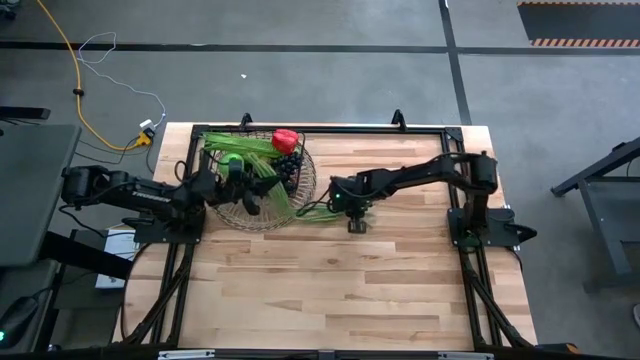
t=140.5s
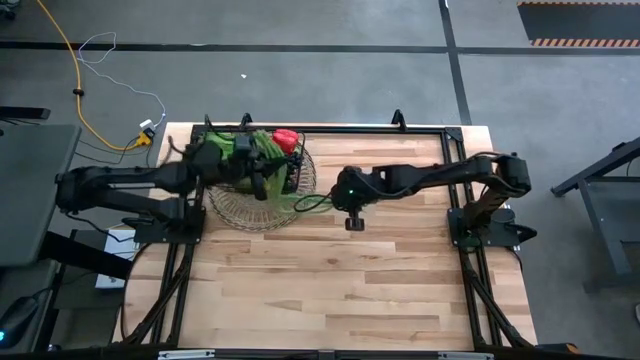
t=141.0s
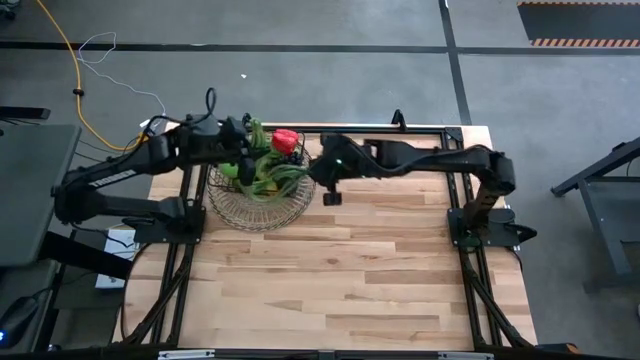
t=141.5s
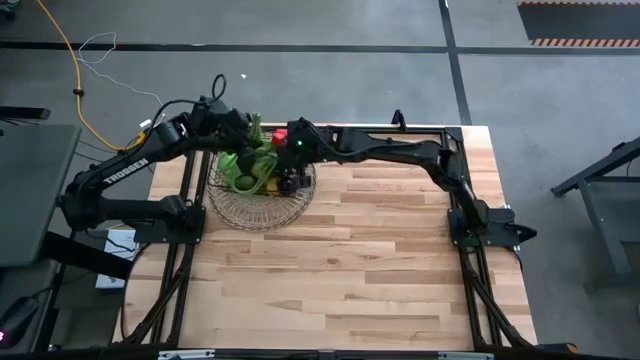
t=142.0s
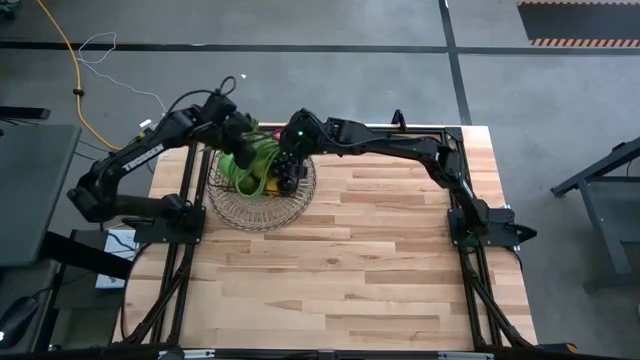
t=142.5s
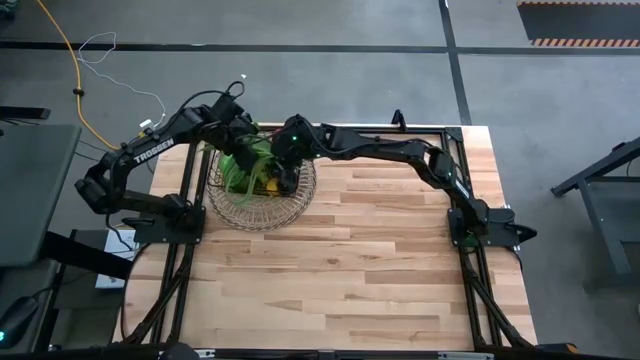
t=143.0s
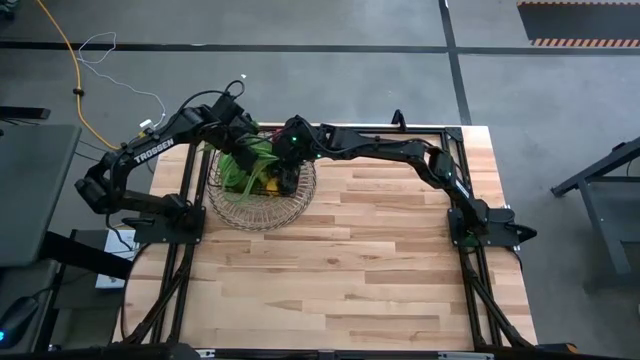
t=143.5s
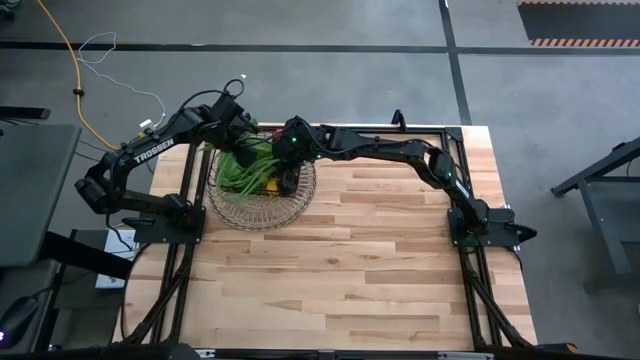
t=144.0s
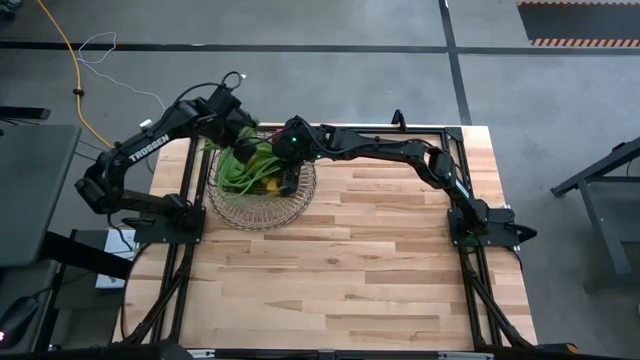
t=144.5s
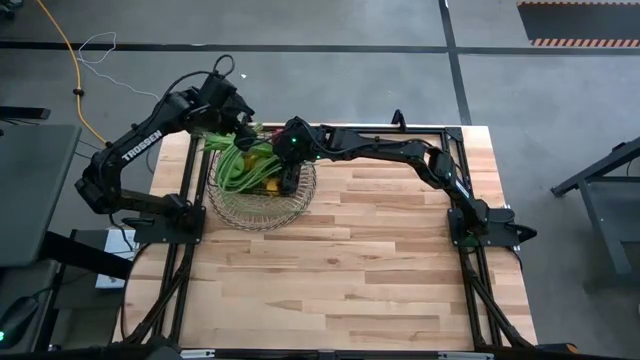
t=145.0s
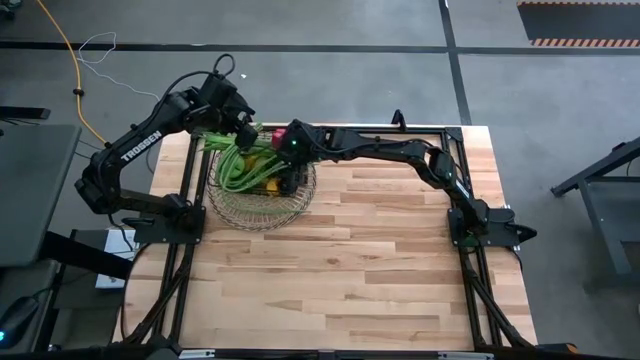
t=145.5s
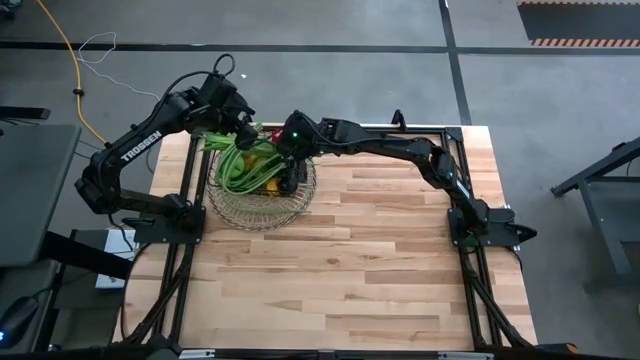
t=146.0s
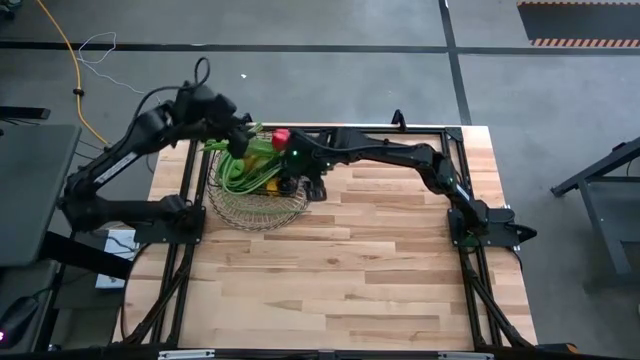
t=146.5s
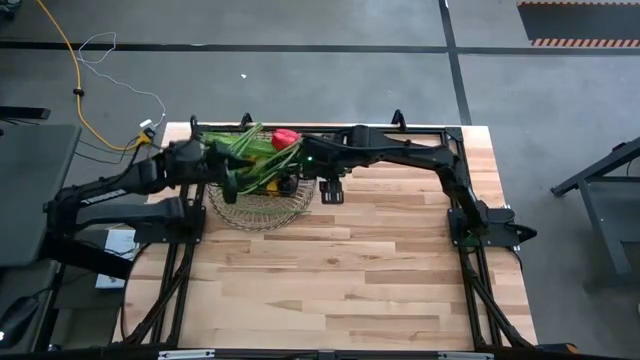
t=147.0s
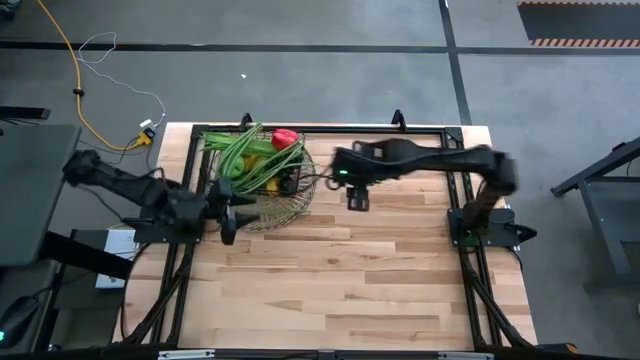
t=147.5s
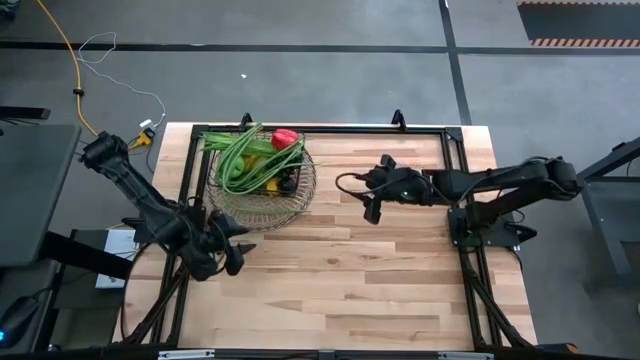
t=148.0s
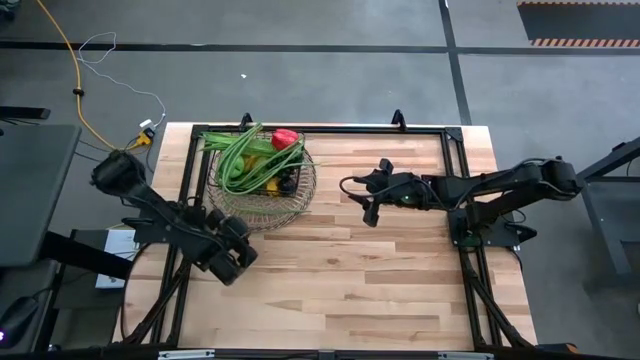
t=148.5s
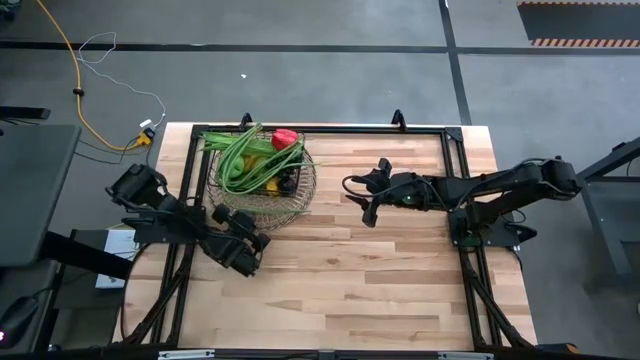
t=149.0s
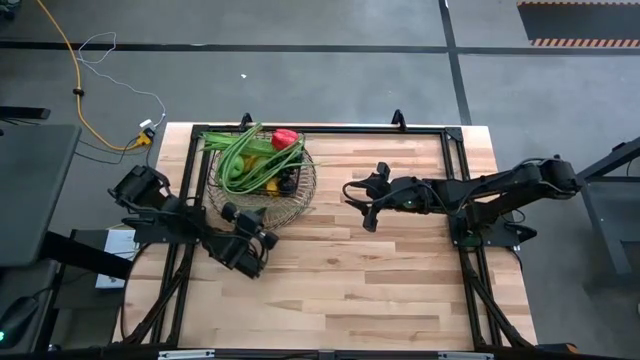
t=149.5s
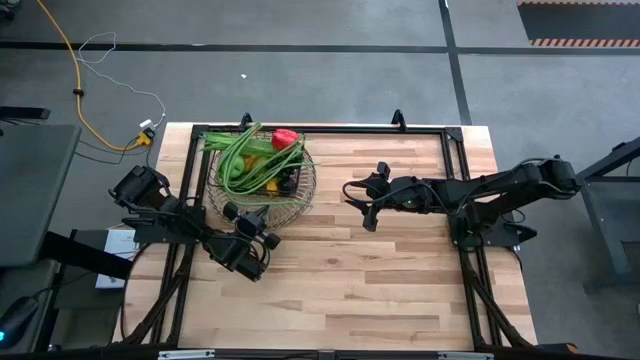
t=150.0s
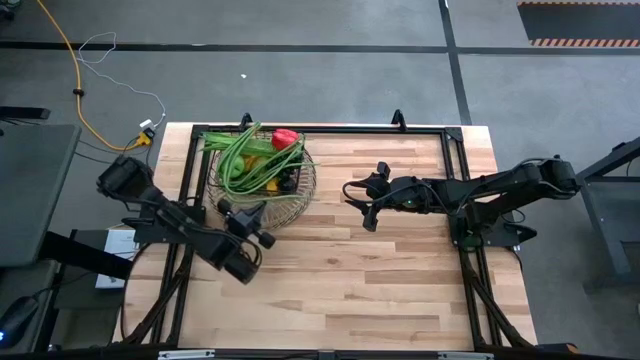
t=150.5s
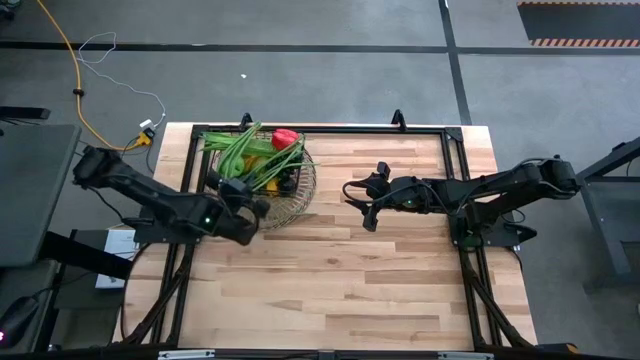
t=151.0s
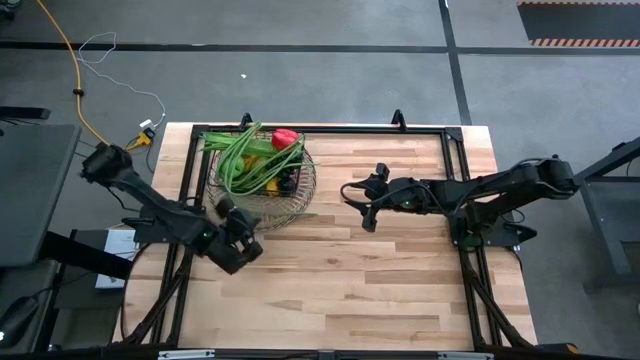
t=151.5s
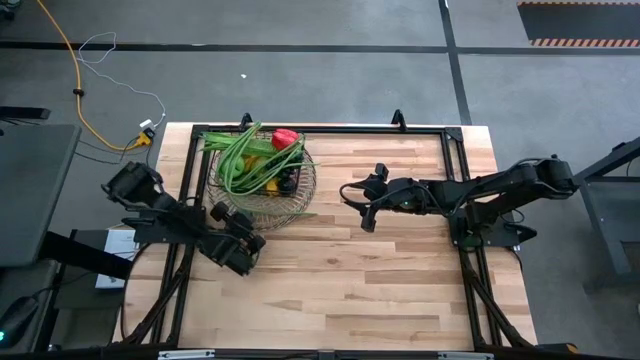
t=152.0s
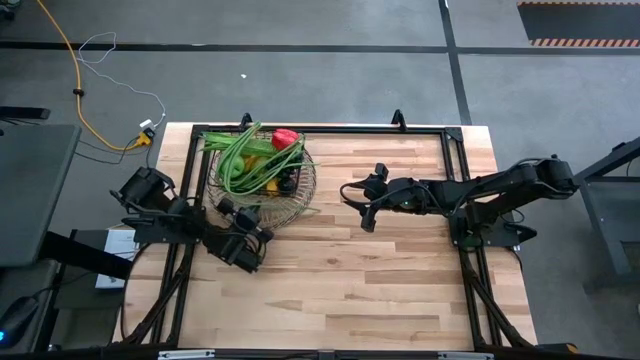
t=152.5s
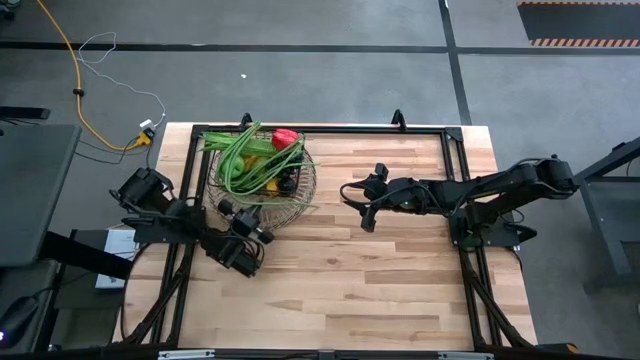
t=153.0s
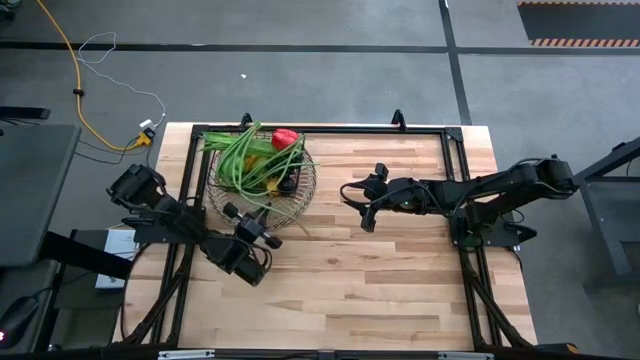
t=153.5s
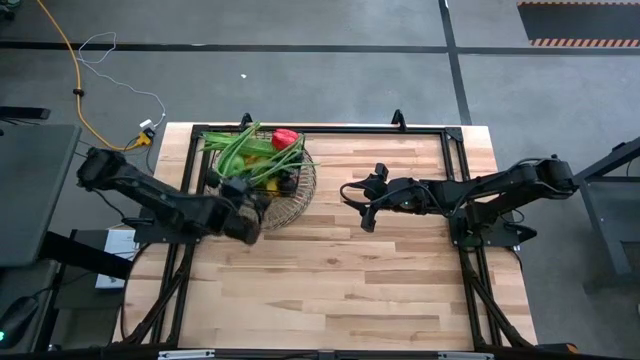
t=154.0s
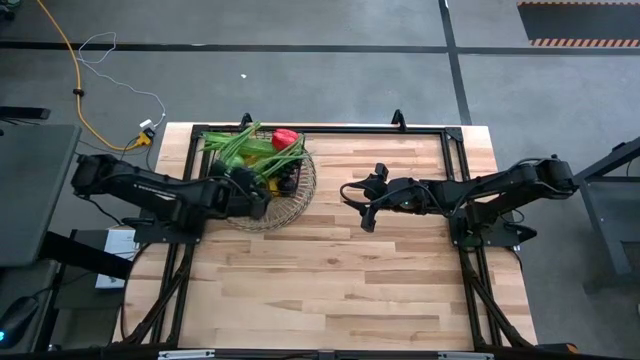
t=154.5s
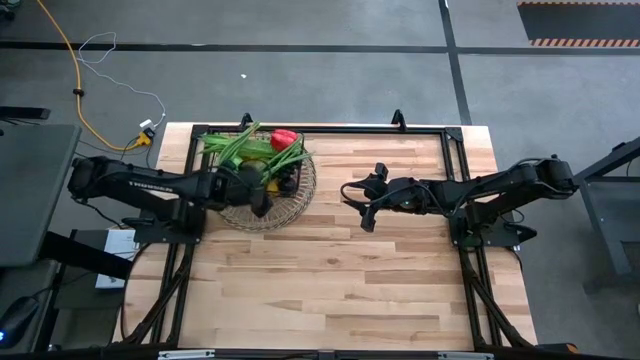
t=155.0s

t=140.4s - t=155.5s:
Task: Build produce basket
Put the green beans into the wire basket

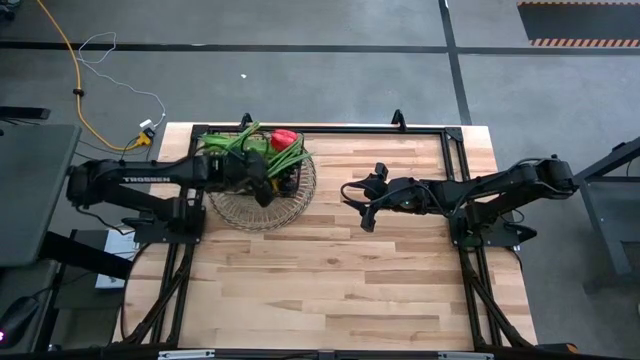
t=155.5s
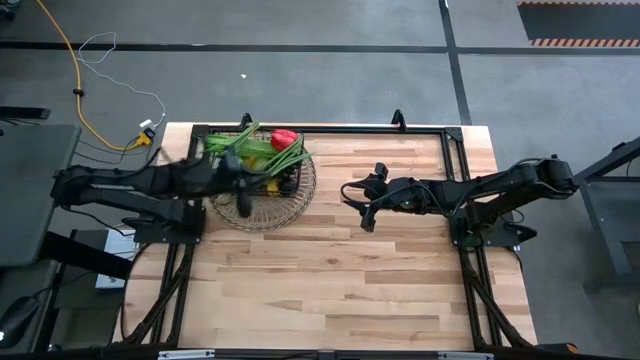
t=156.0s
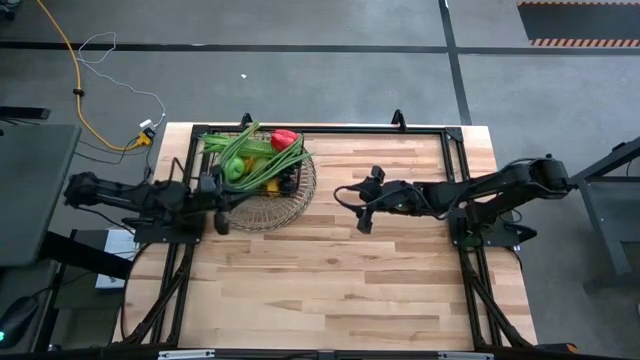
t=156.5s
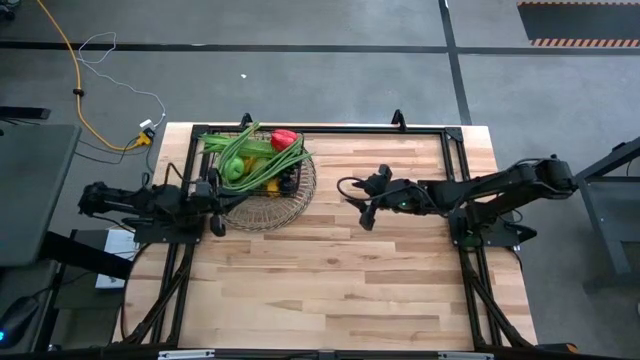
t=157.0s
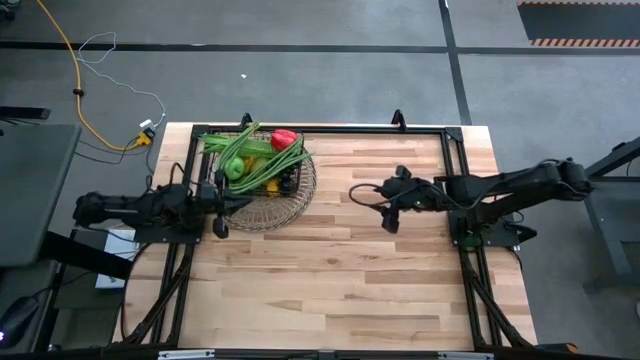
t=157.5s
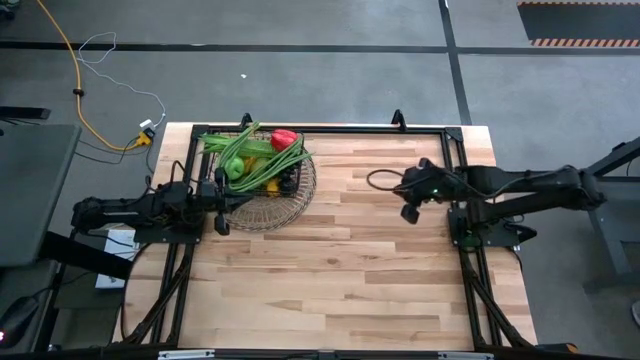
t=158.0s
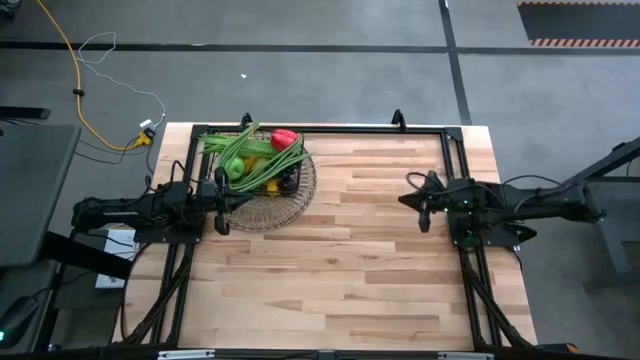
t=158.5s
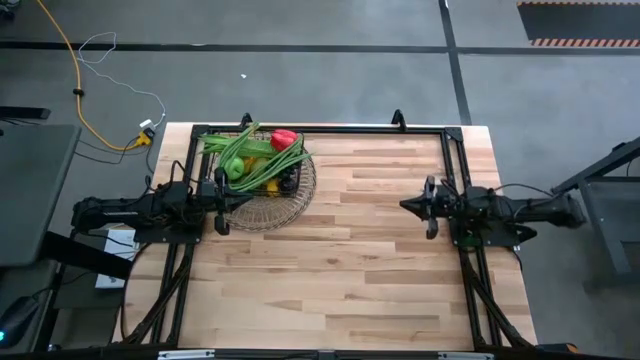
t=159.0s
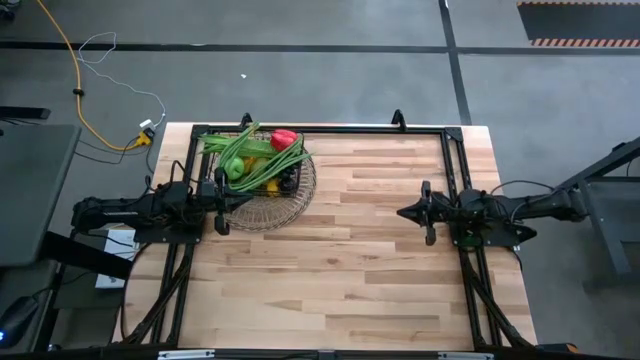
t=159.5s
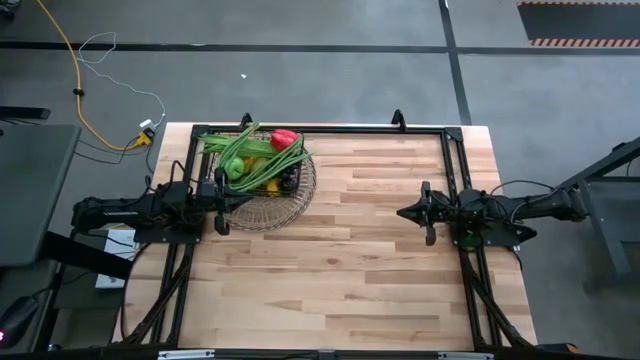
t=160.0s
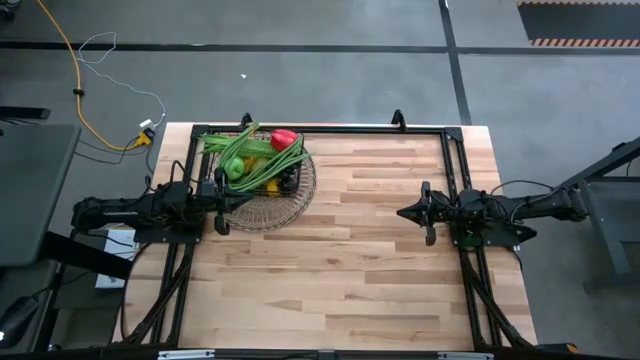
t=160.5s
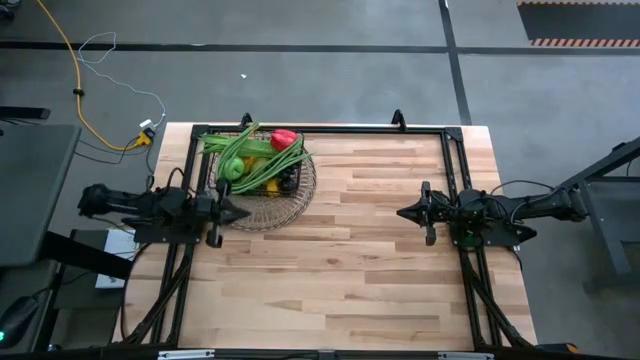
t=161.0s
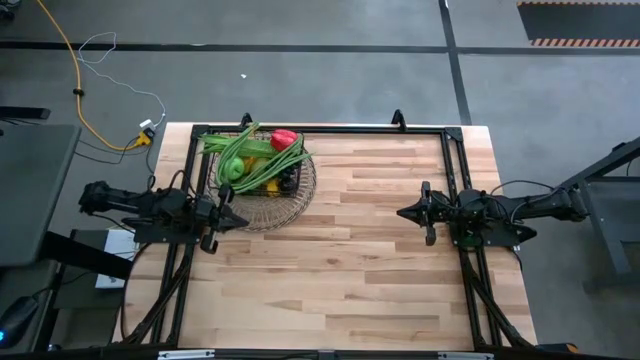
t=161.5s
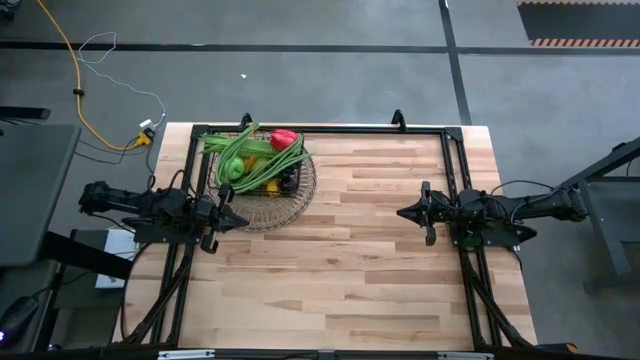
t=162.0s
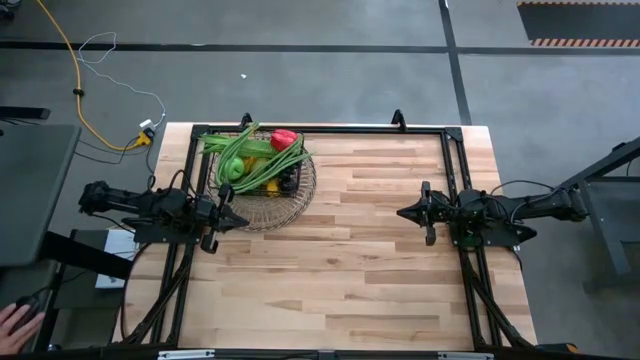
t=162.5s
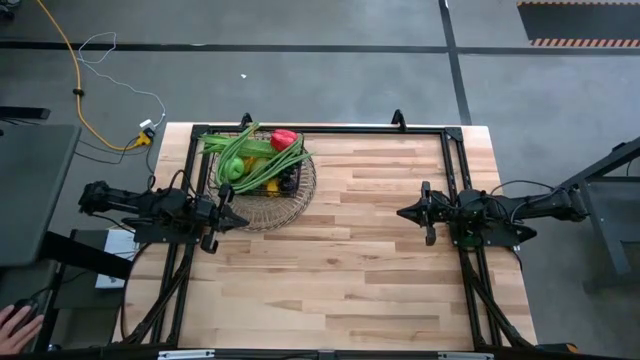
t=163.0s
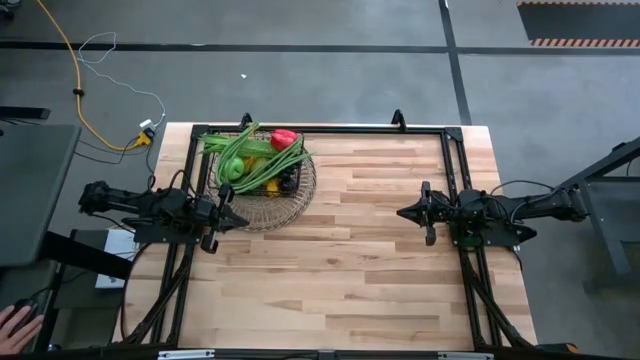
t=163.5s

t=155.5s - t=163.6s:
Return to Home Position
